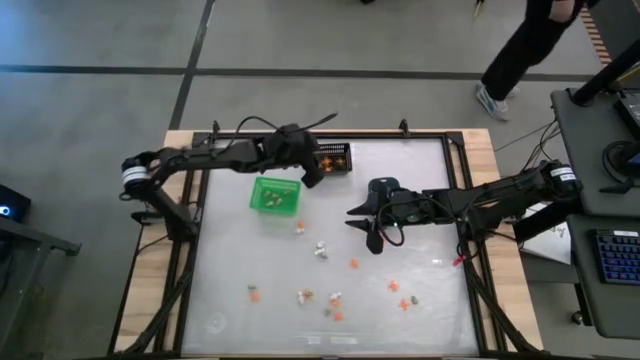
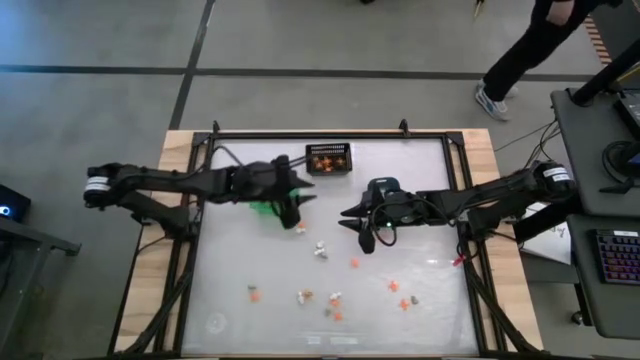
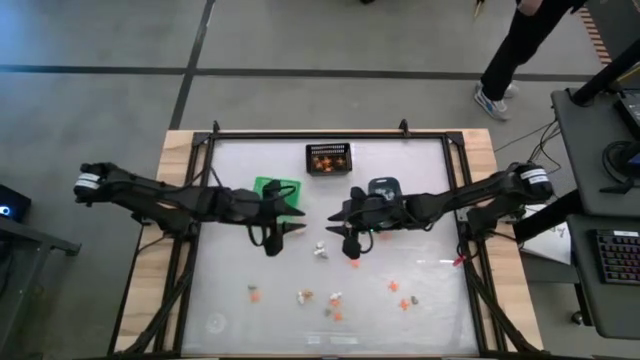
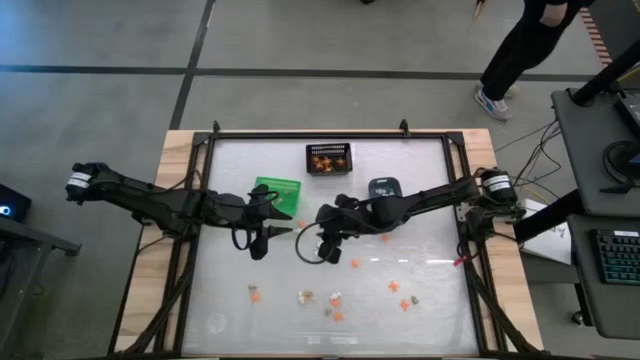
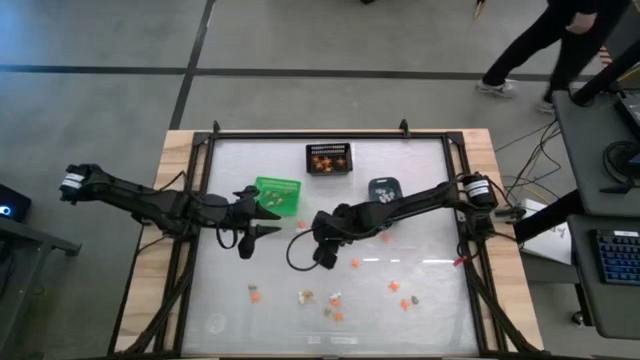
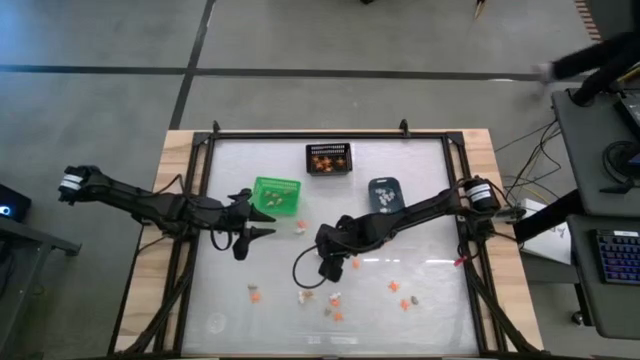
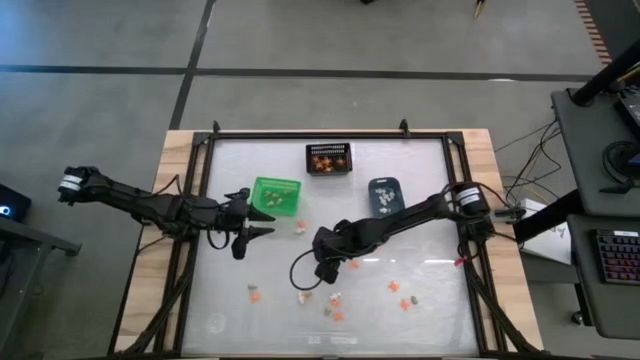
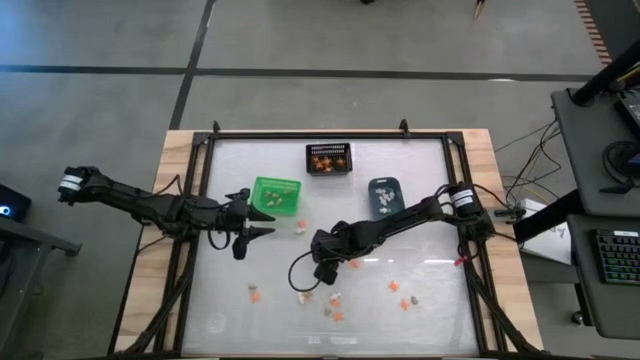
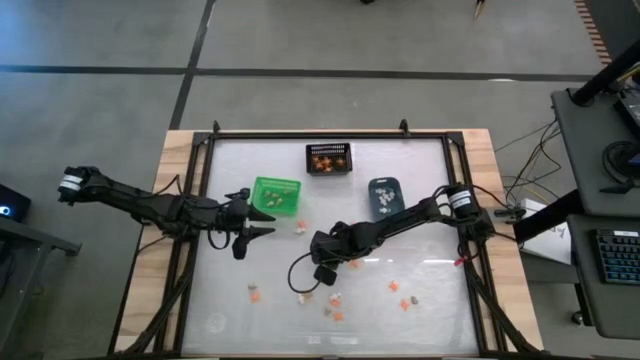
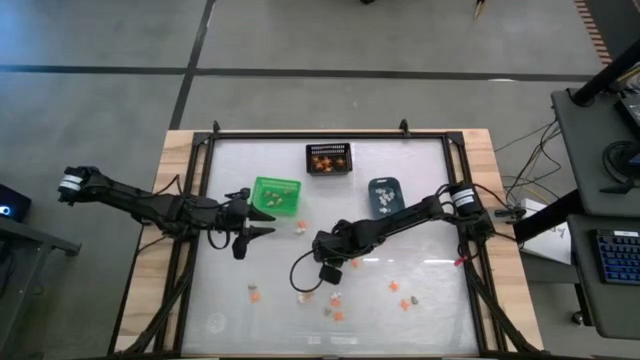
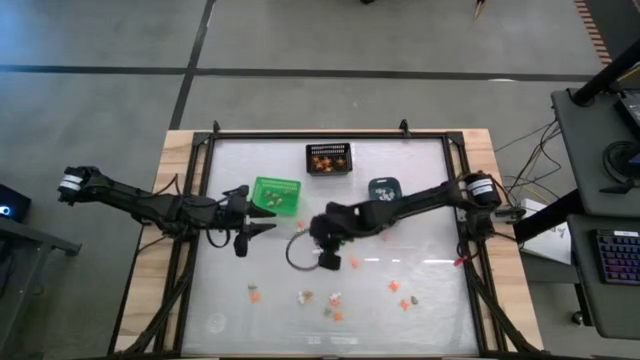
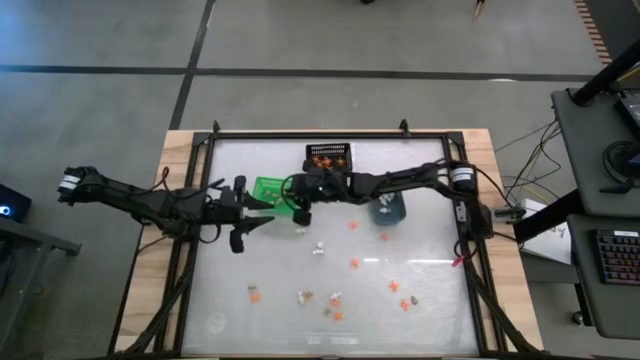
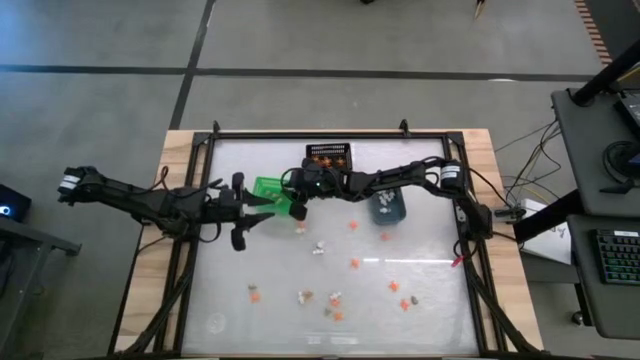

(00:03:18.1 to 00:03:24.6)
Task: Sort Halloween decoration
Put the gray skull toy into the green bin

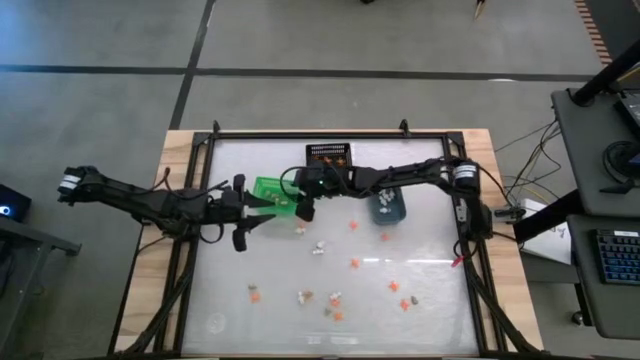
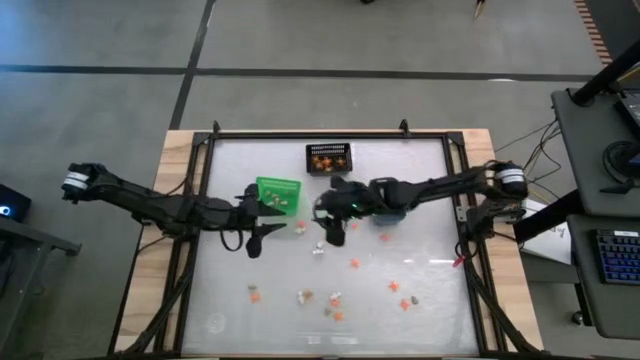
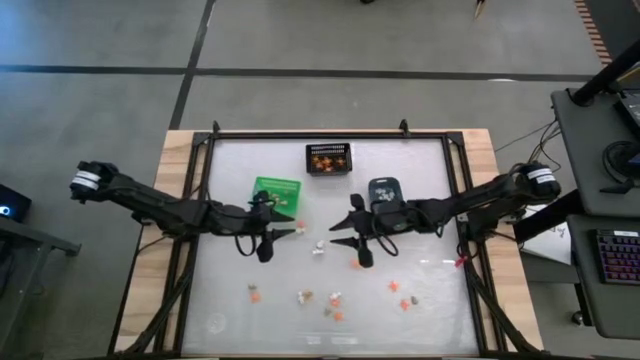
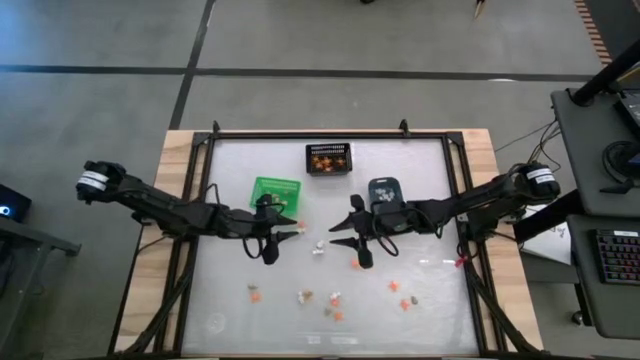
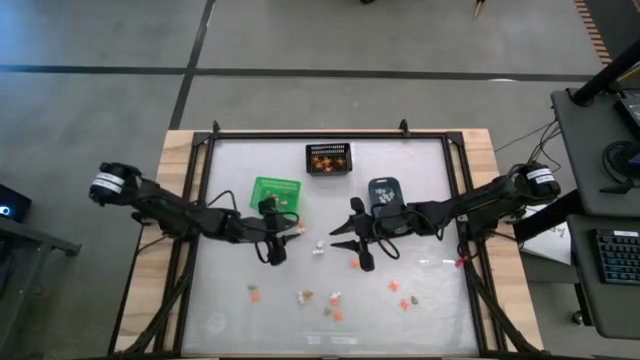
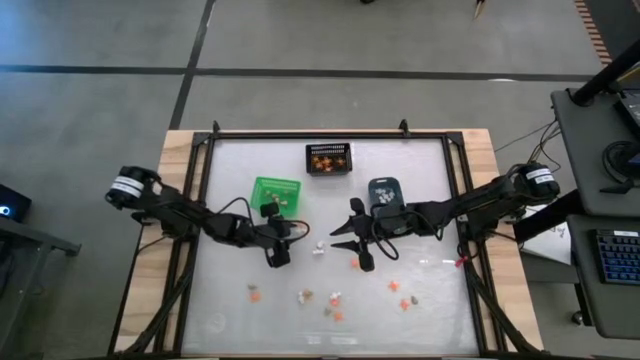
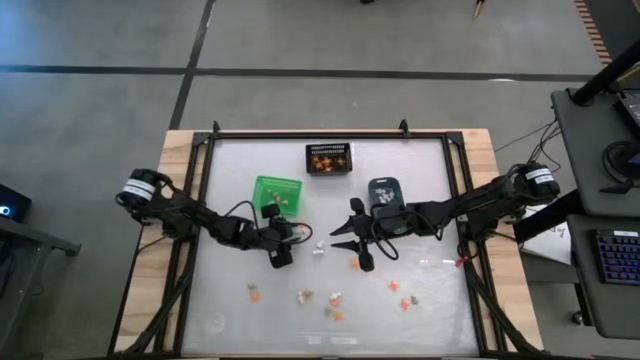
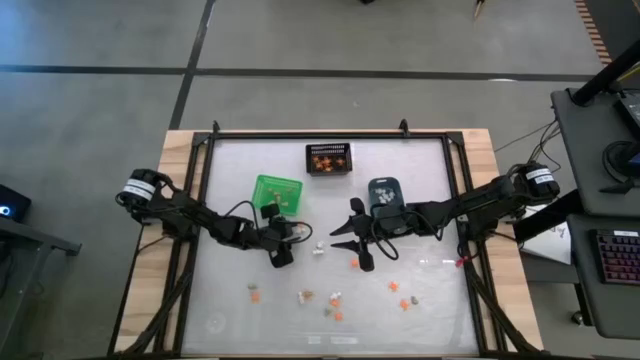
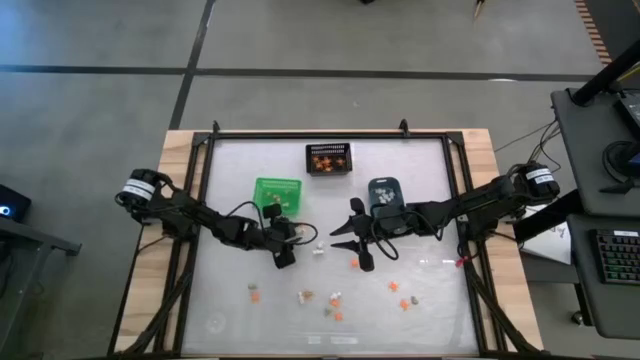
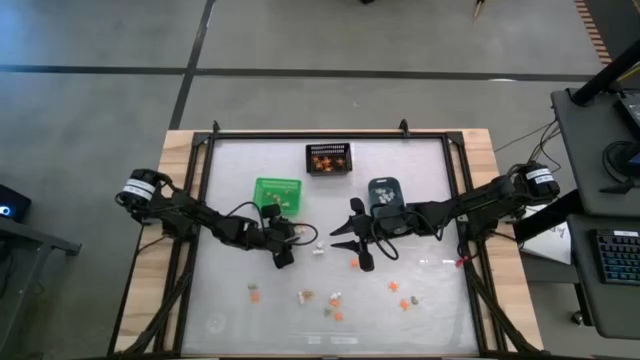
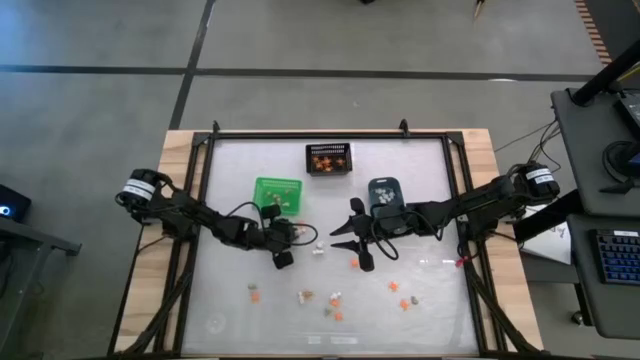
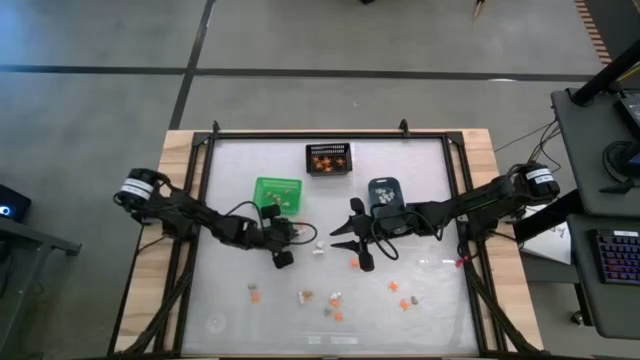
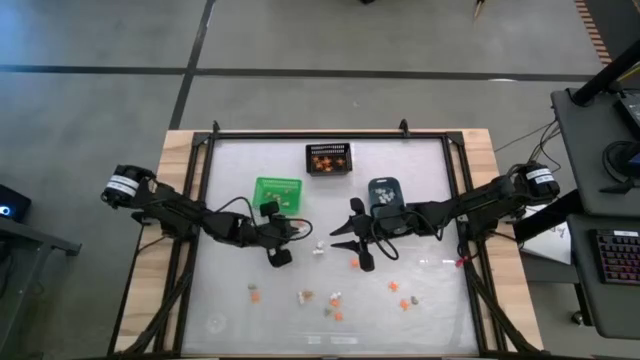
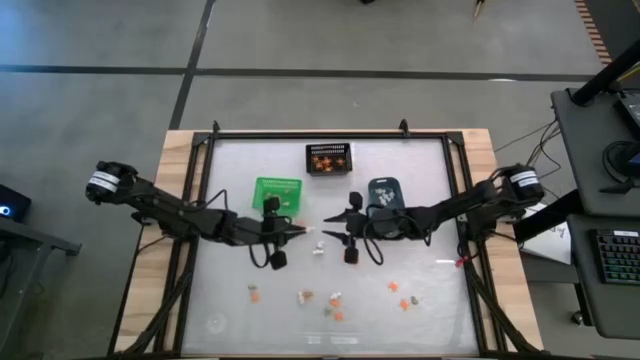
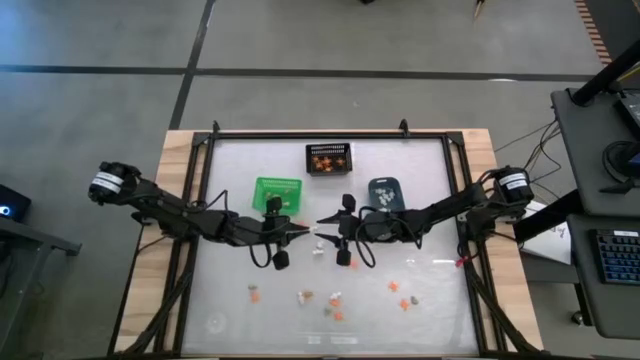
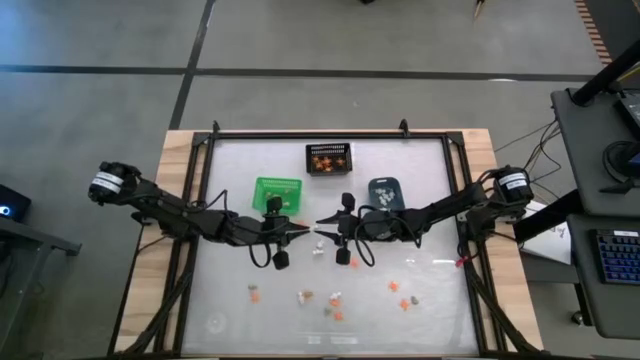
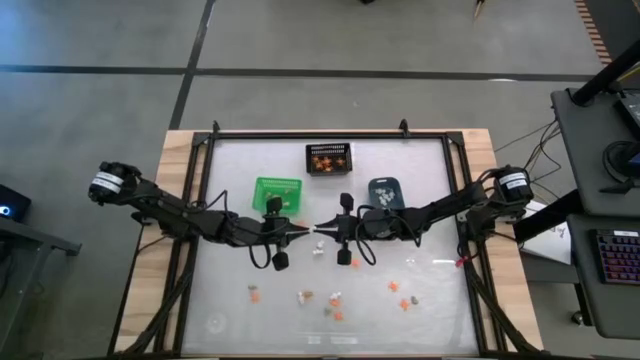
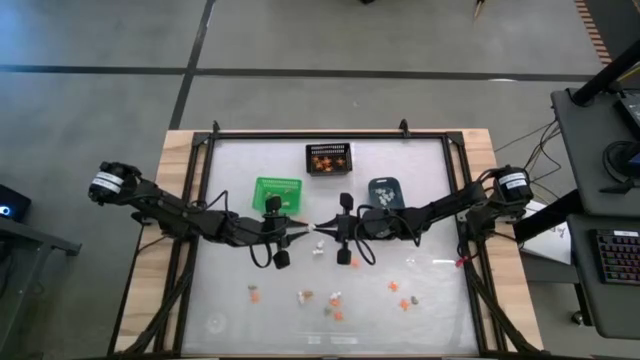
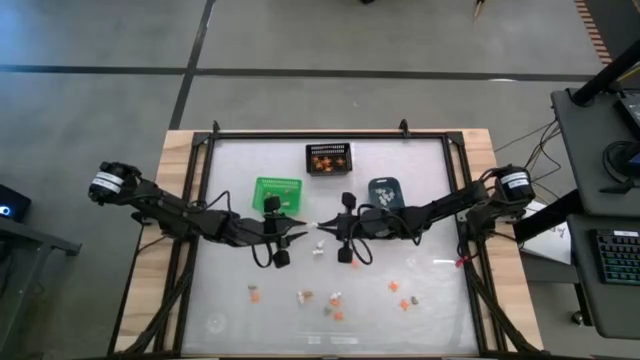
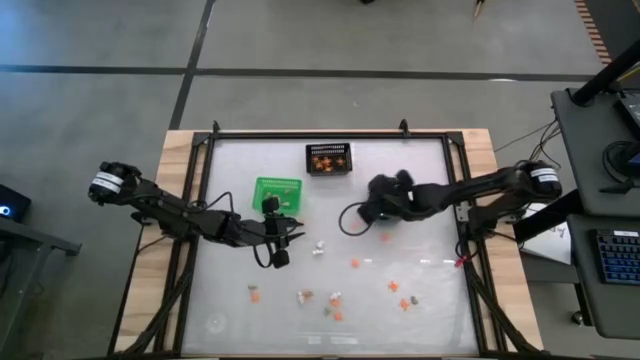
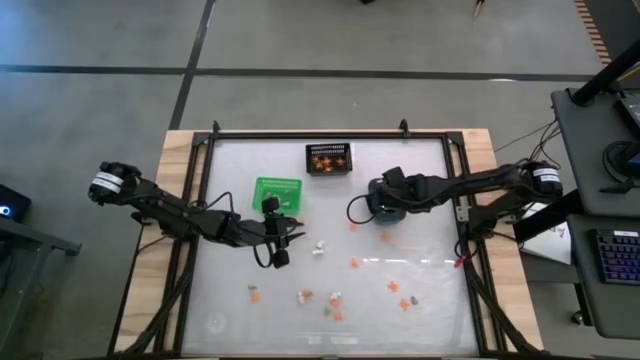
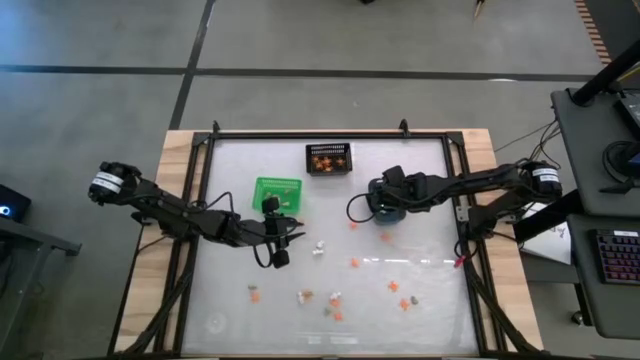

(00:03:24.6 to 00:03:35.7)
Put the white skeleton toy into the blue bin

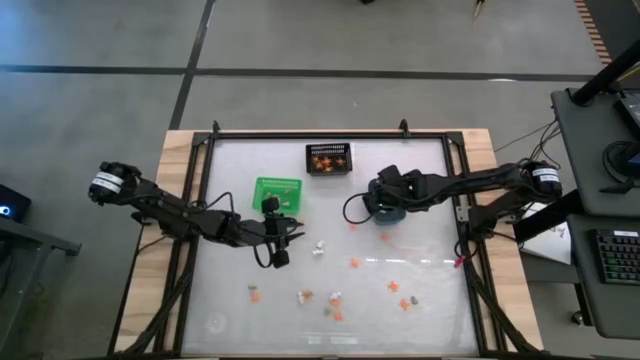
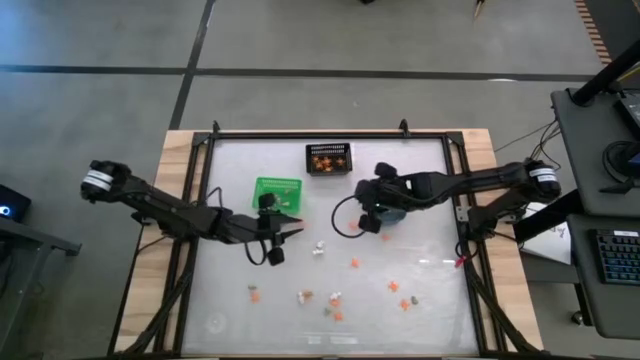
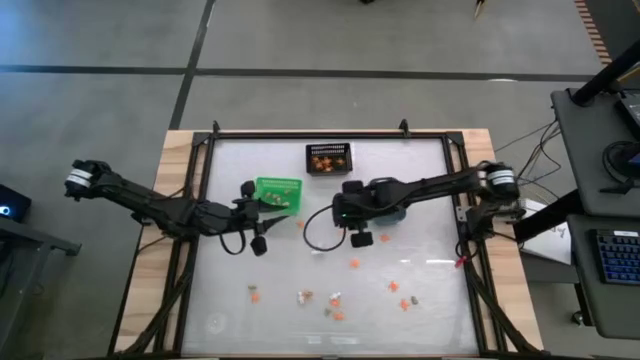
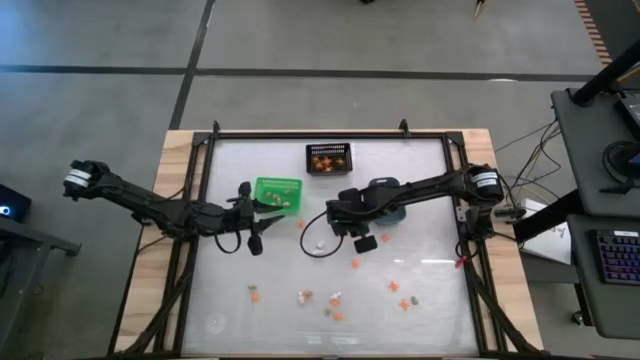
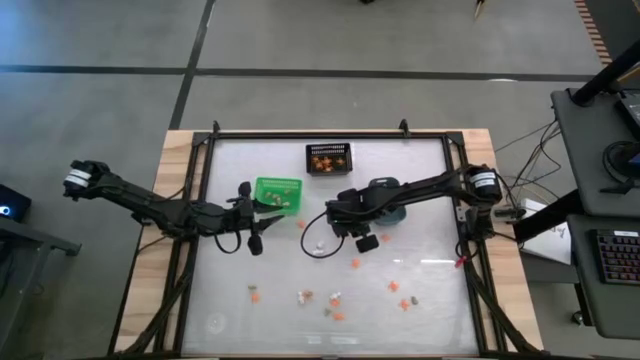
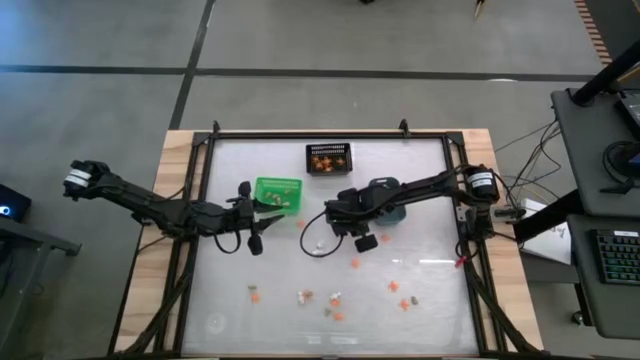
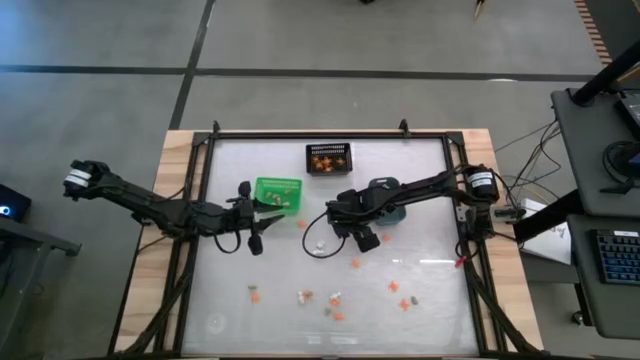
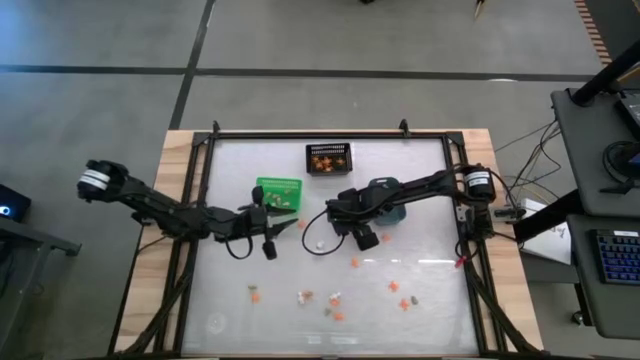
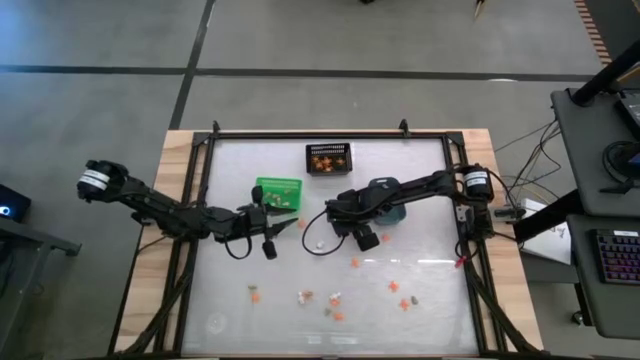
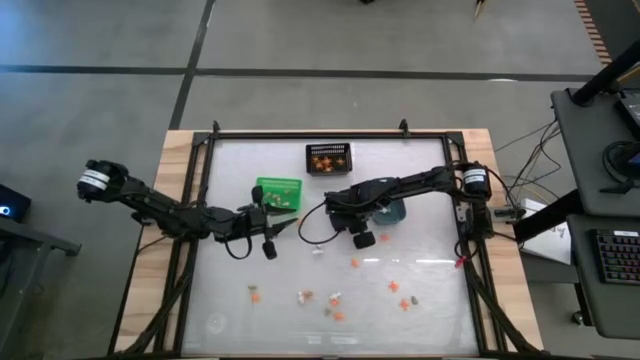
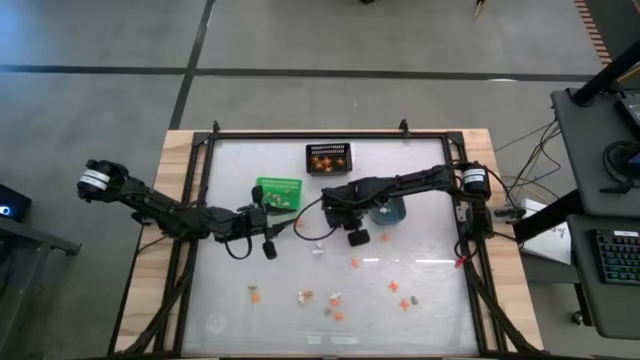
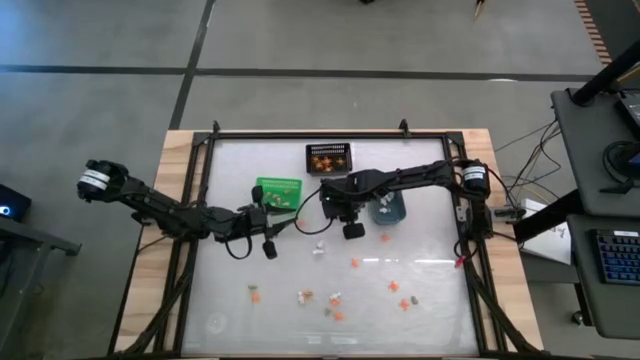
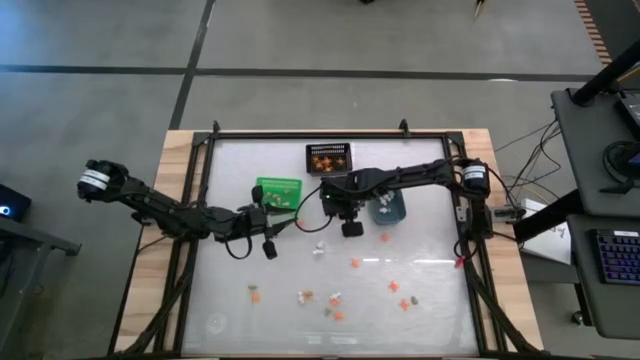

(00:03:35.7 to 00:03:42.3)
Put the orange spider toy into the black bin
